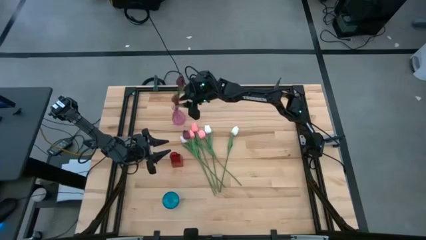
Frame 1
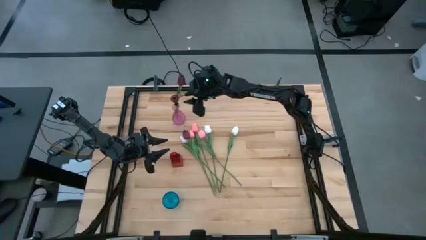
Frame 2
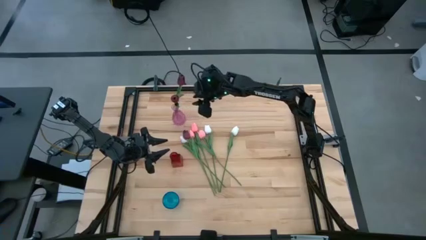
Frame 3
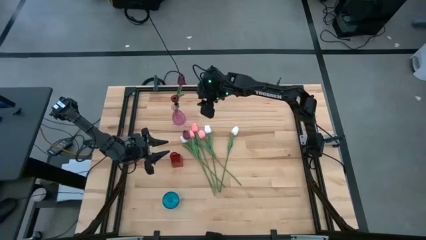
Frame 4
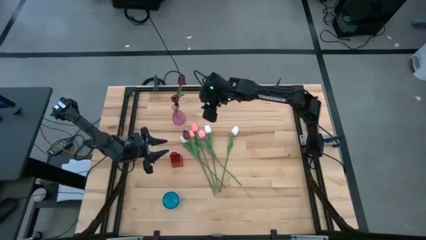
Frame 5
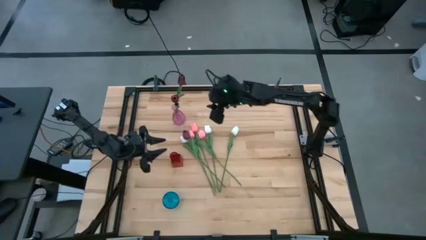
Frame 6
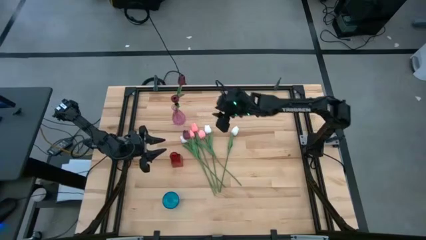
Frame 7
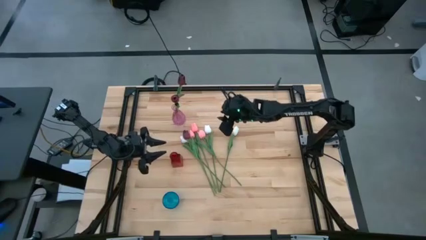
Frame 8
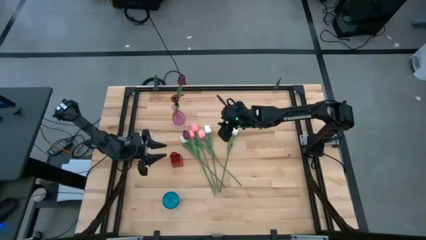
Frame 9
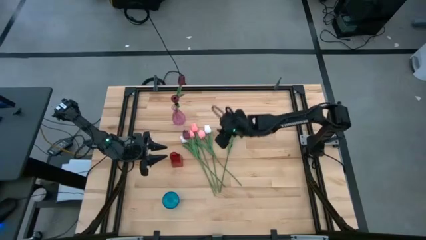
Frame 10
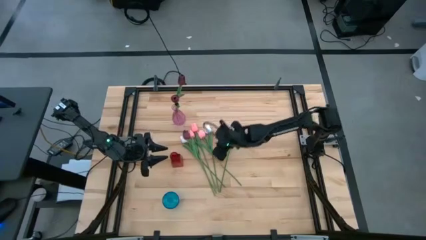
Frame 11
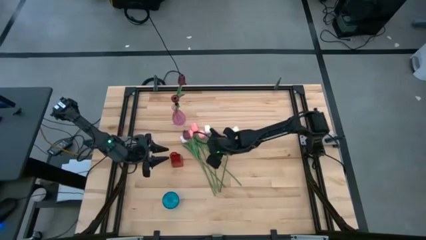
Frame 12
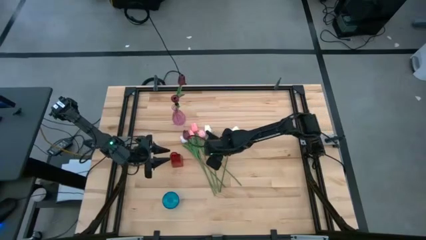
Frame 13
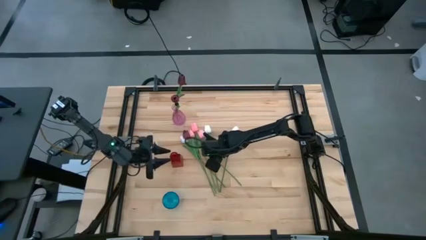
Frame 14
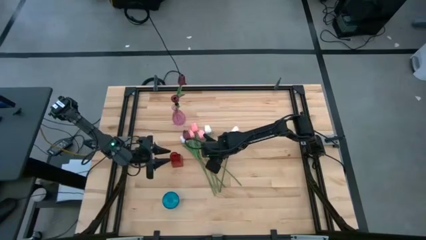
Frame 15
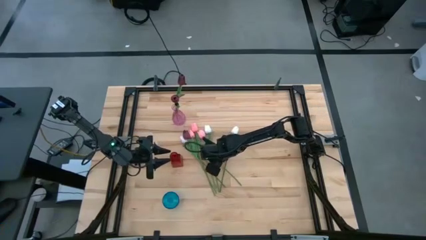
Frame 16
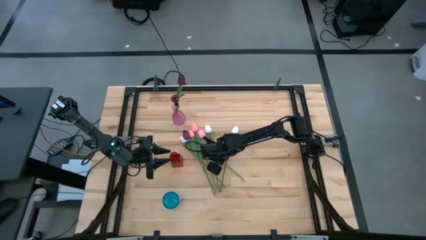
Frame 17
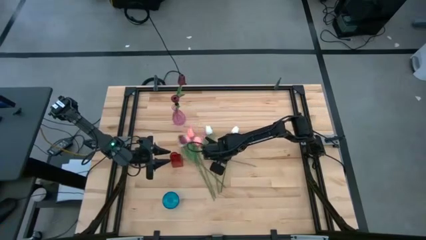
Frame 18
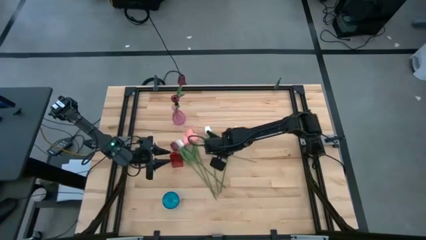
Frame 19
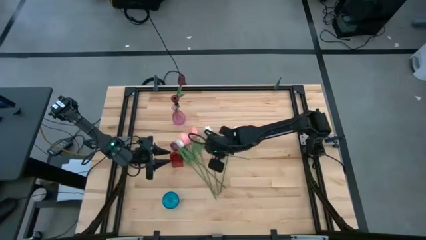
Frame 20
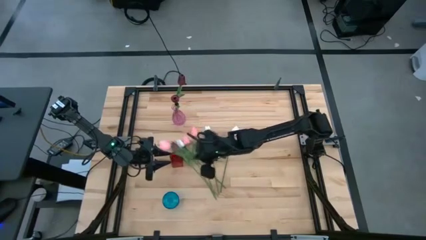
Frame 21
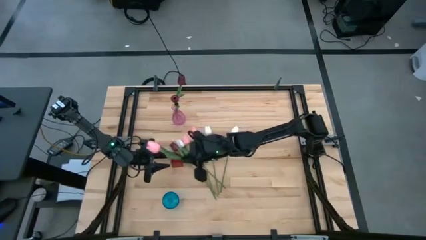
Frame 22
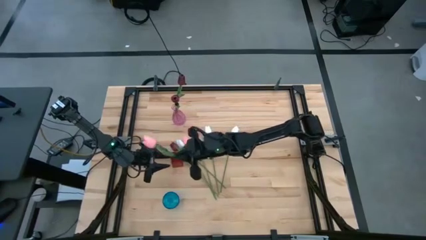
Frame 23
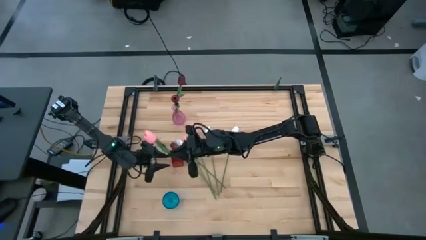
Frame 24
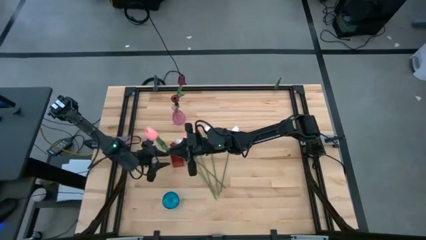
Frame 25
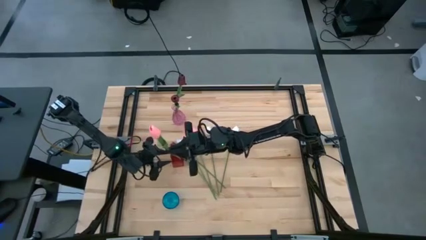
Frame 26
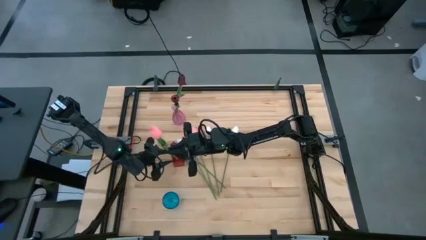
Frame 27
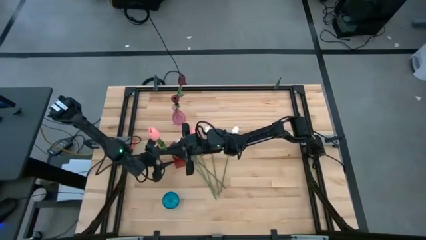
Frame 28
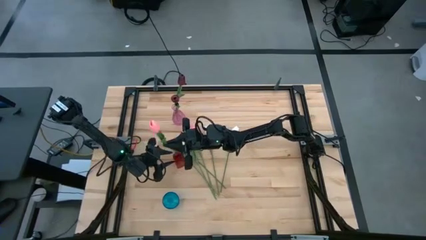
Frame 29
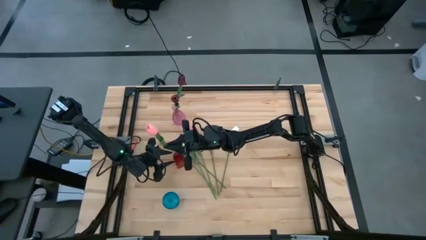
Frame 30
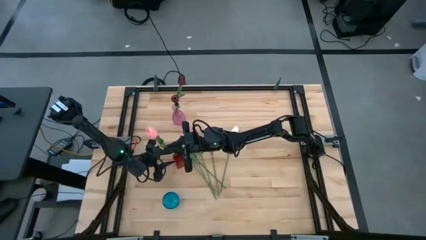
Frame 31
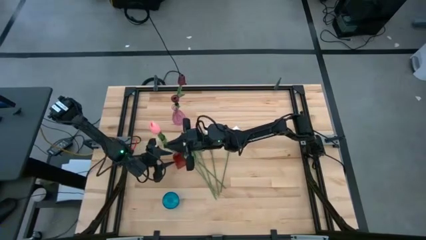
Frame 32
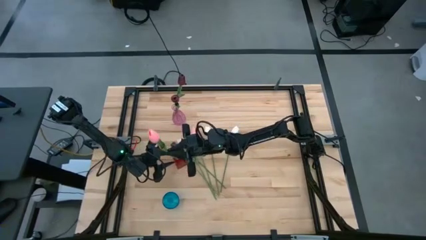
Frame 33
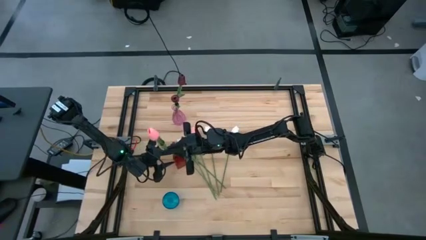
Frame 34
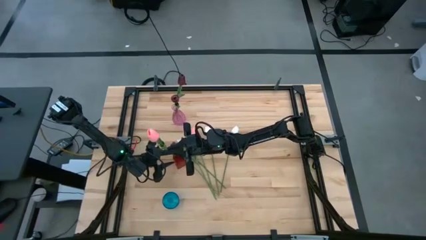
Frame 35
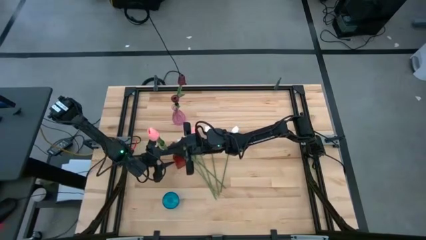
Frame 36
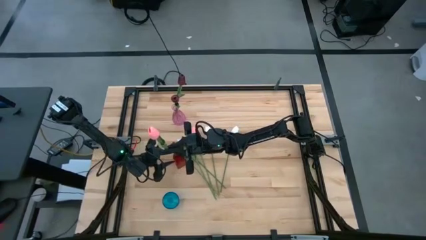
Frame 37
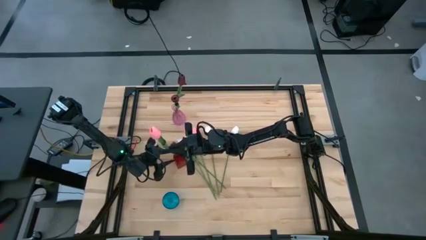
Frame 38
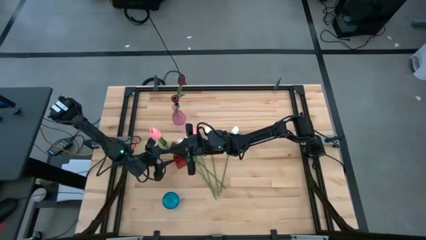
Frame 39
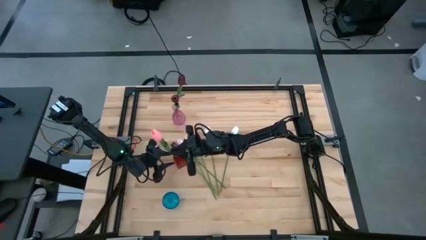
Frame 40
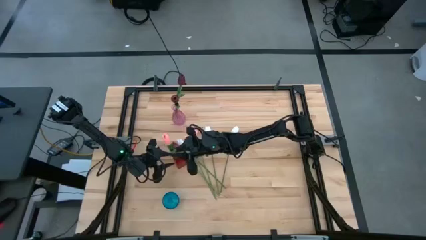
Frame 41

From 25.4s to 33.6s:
Task: Sort flowers into vase by color
Put the right pink flower into the red vase

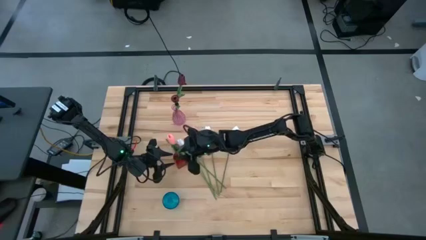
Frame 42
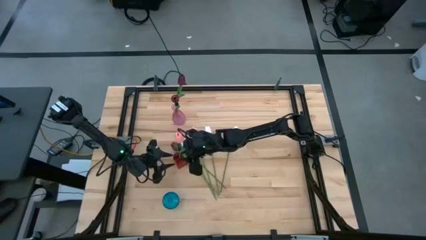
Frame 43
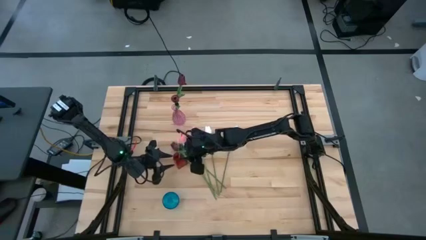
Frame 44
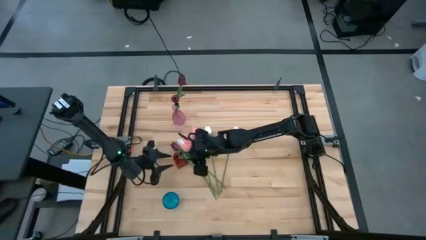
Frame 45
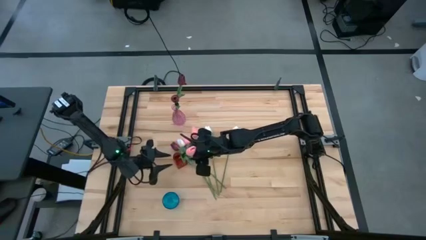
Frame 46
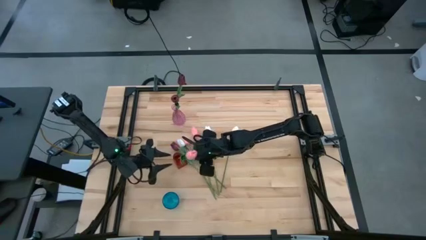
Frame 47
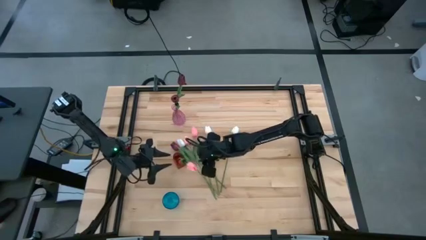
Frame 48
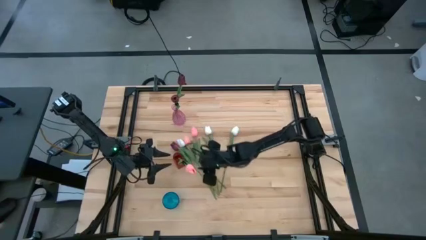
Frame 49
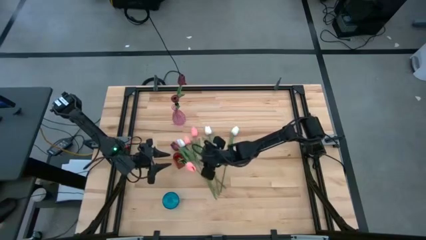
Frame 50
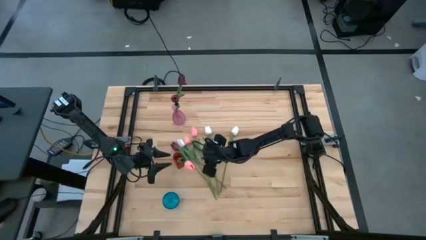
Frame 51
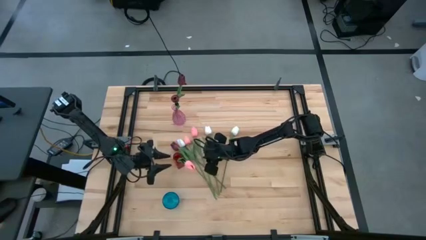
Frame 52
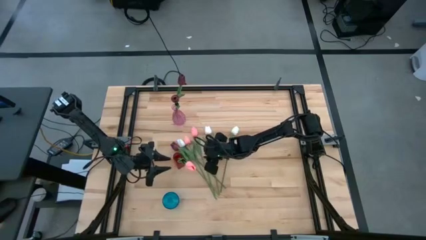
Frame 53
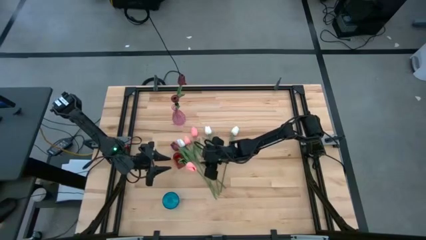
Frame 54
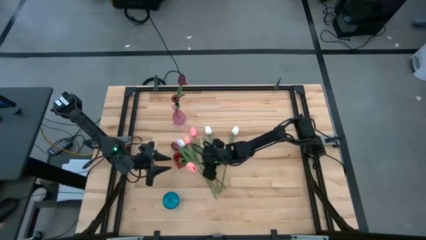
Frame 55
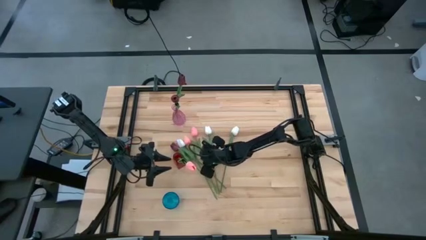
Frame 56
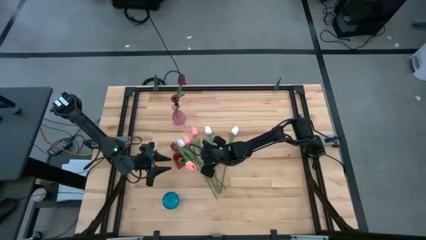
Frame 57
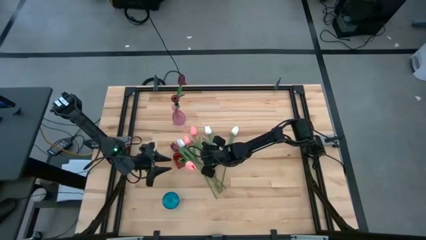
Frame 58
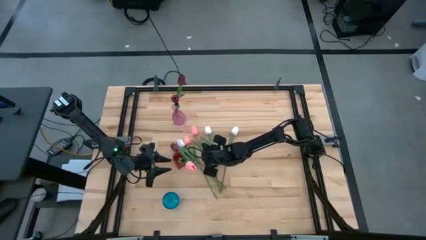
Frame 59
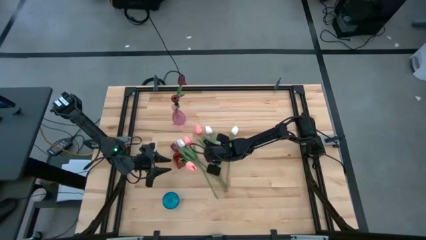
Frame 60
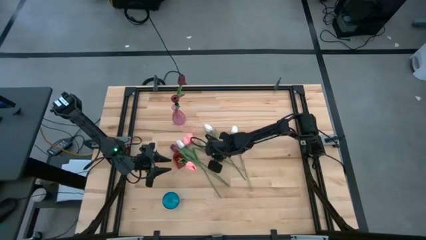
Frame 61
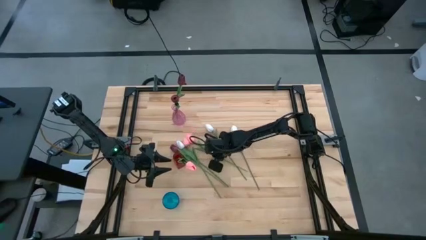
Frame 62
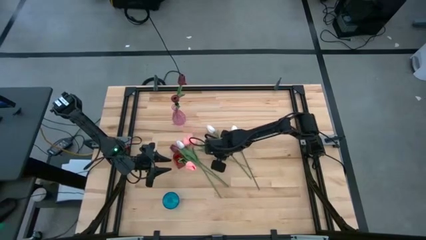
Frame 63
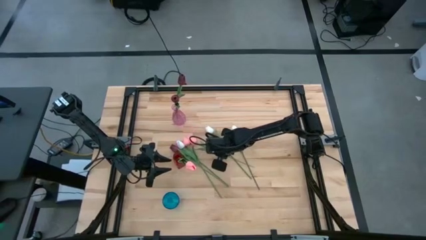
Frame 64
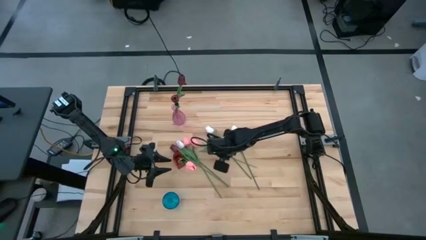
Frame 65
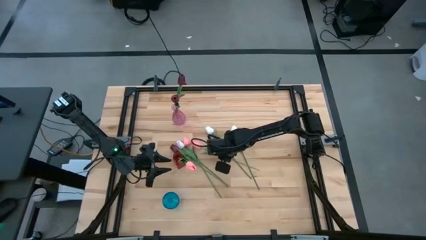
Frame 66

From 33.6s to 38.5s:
Put the right pink flower into the red vase

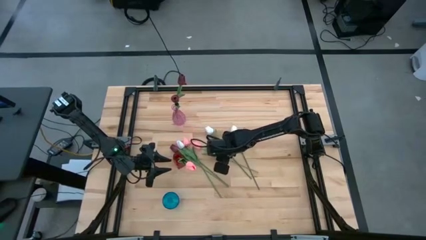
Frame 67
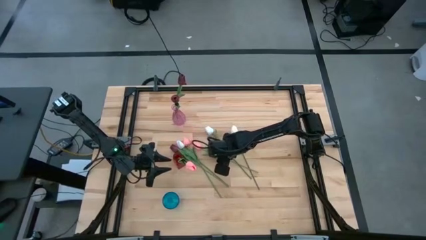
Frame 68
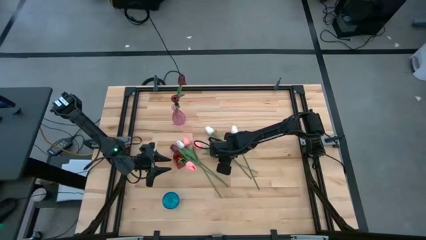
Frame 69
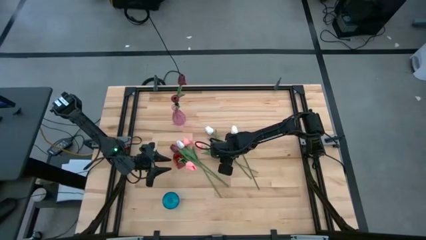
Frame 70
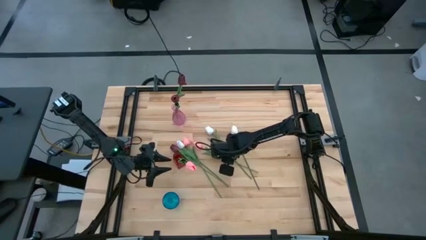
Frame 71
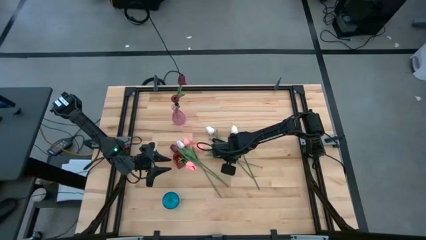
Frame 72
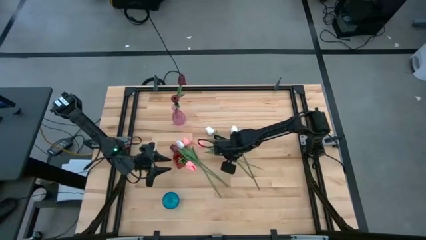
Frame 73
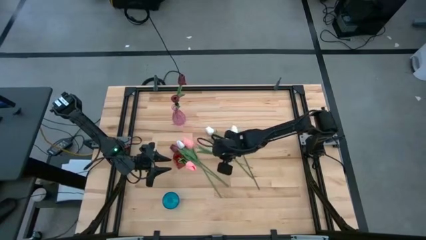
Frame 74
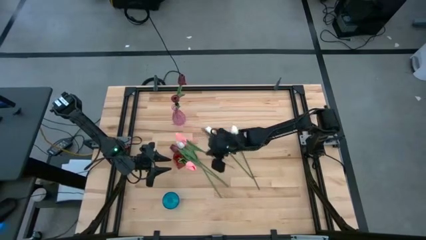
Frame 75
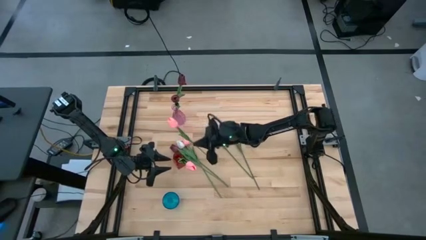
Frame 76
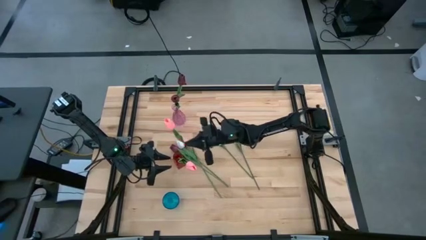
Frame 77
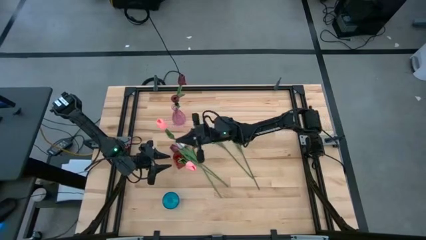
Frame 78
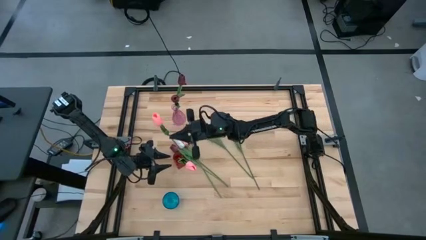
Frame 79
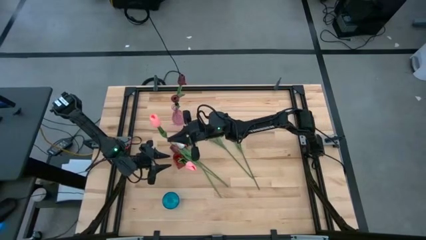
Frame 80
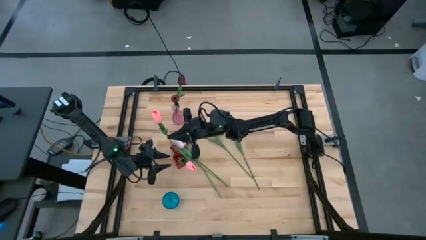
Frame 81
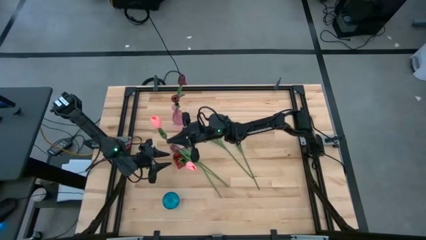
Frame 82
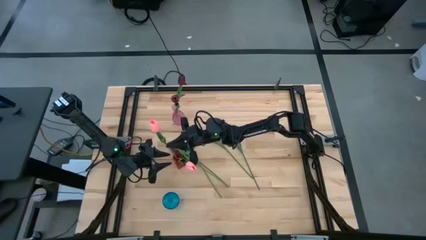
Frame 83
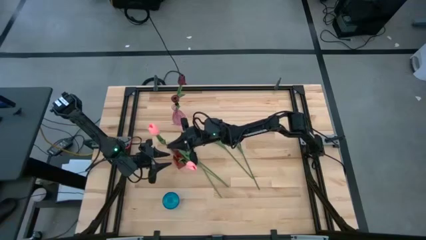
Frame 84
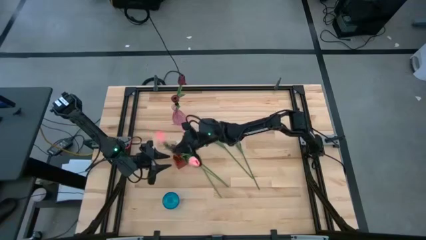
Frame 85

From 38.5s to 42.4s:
Put the right pink flower into the red vase

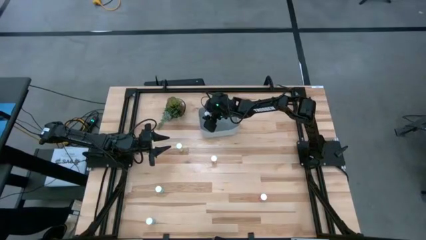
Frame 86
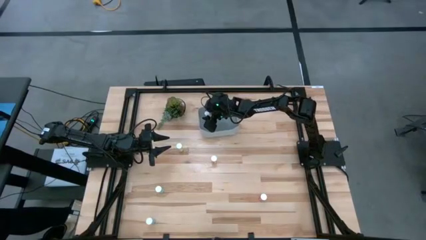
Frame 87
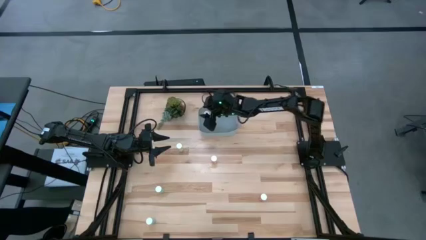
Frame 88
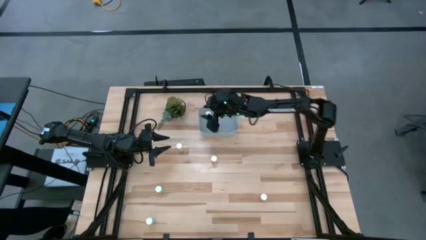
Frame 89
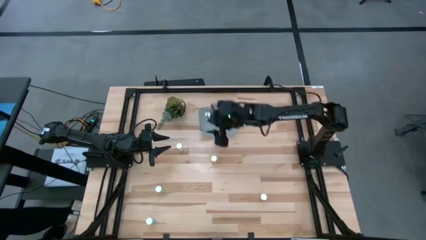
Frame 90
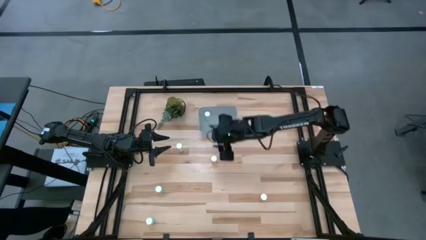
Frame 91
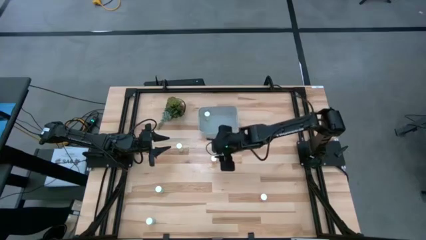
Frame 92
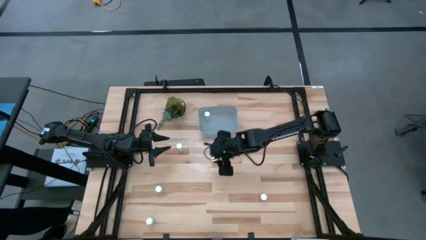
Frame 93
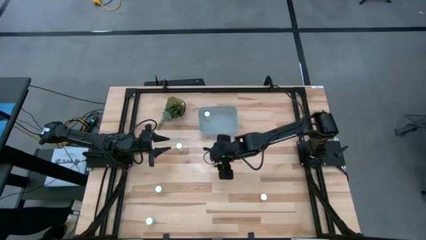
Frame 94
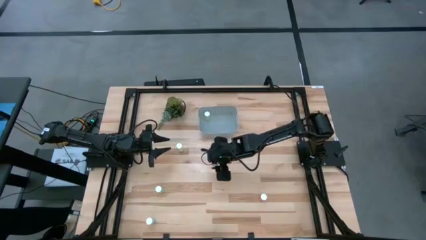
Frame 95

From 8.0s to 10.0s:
Task: Pick and place pill bottles into a basket
Put the right yellow pill bottle into the bin
